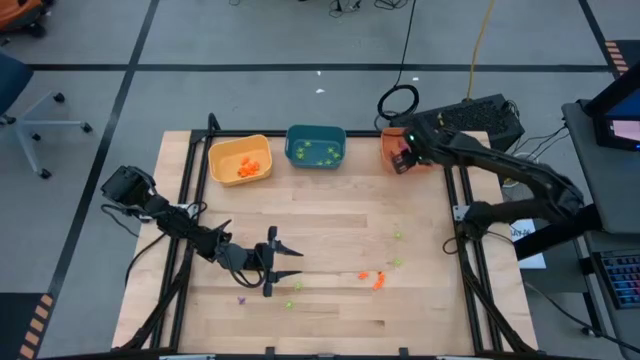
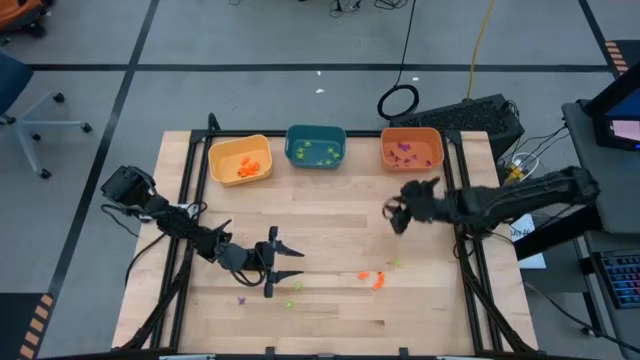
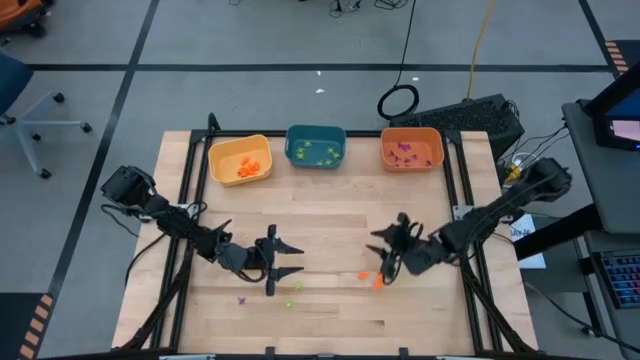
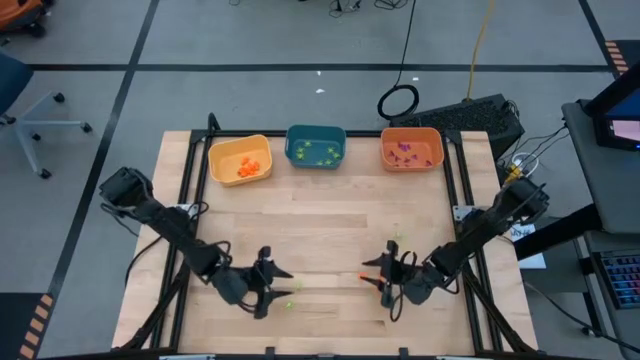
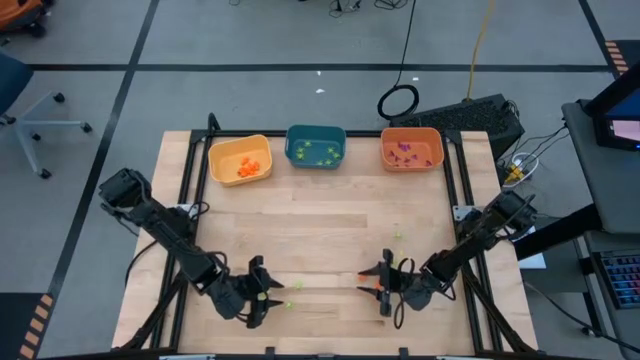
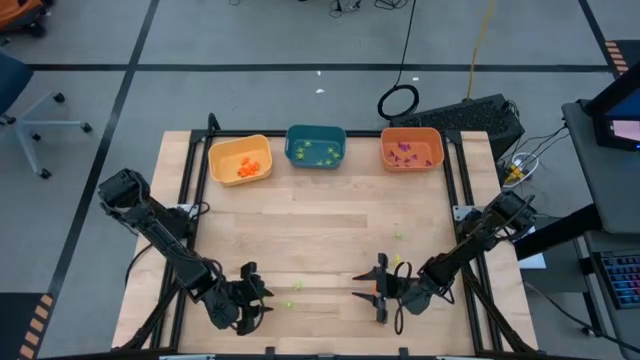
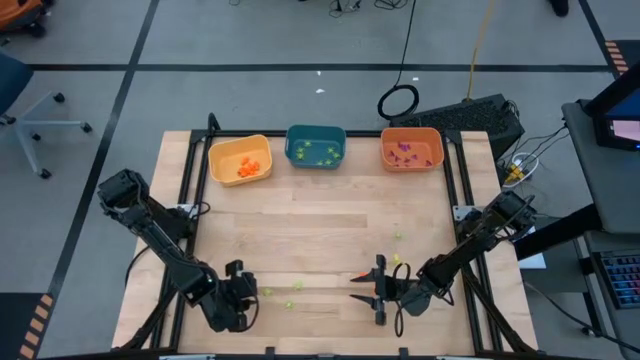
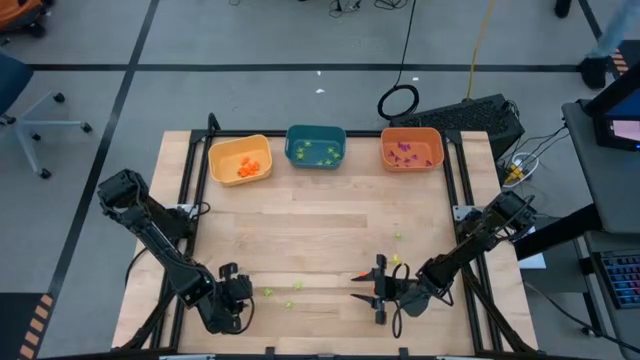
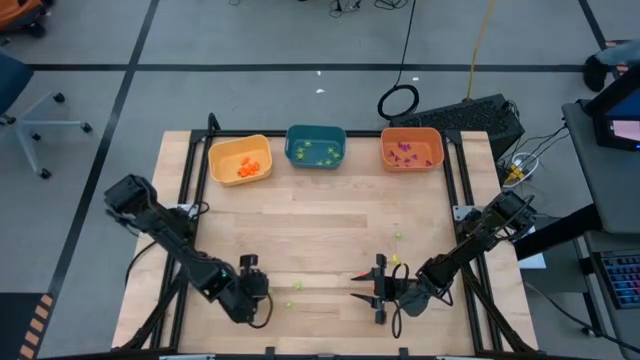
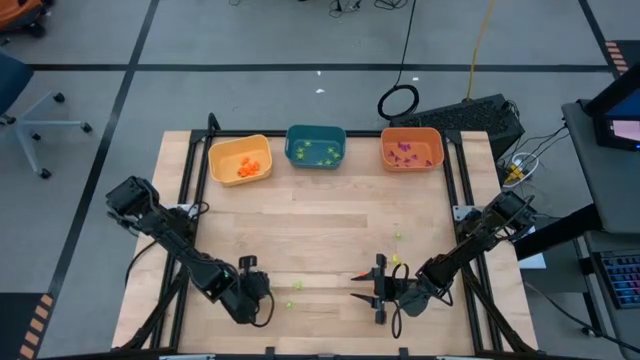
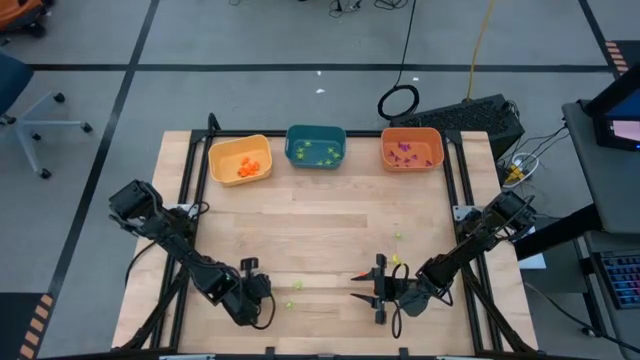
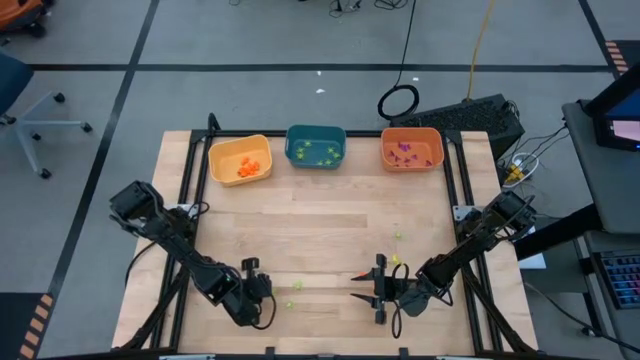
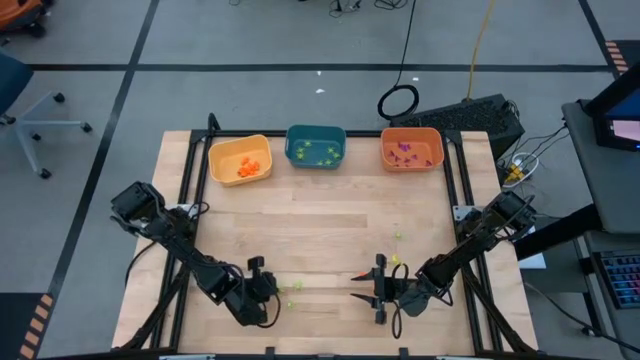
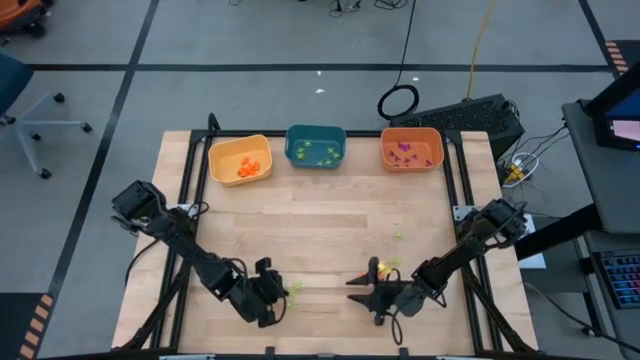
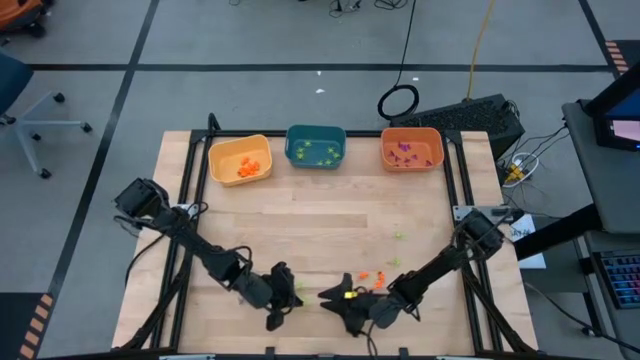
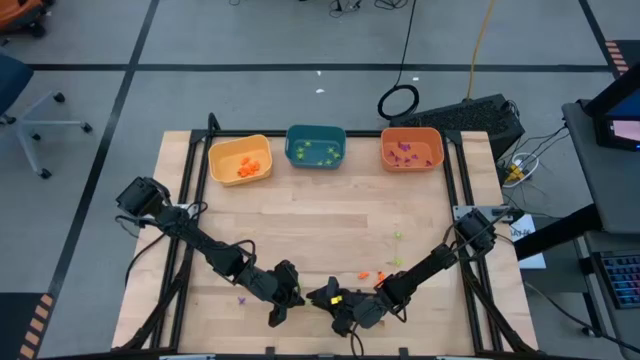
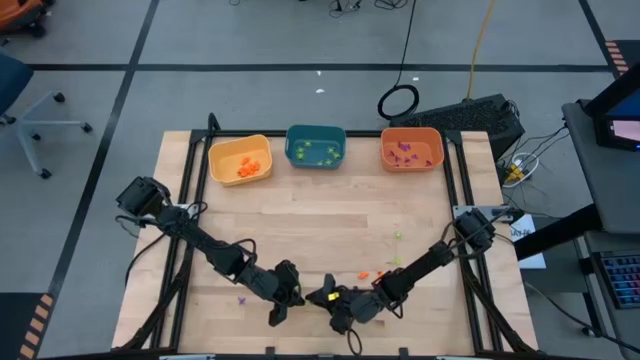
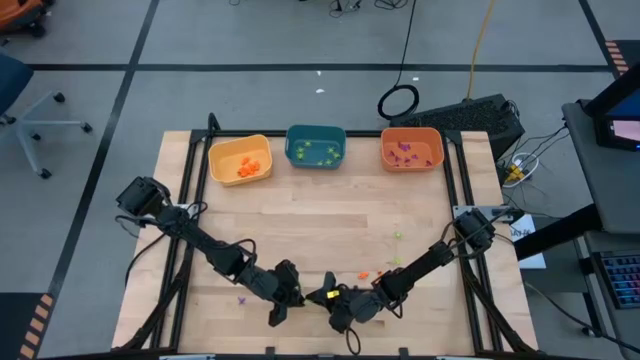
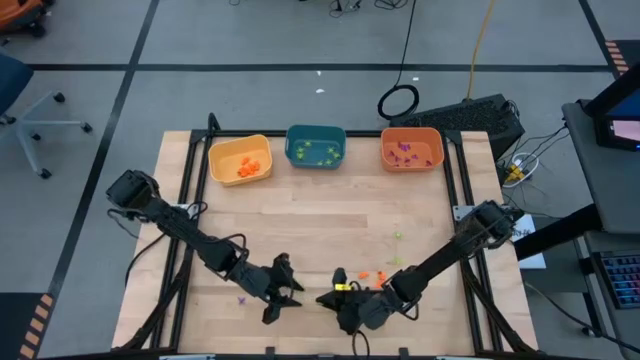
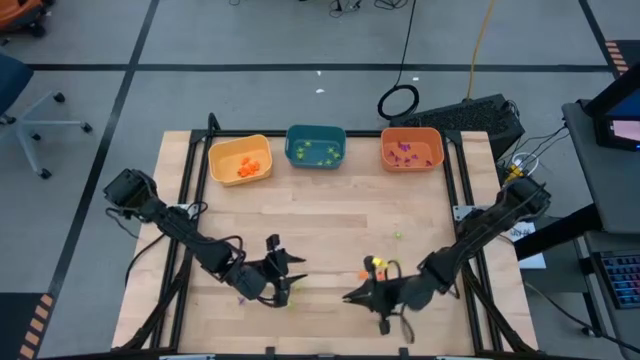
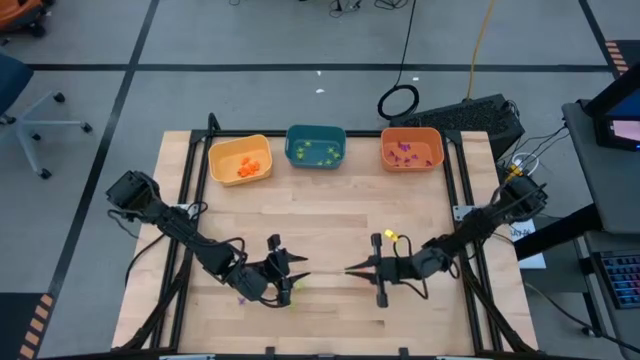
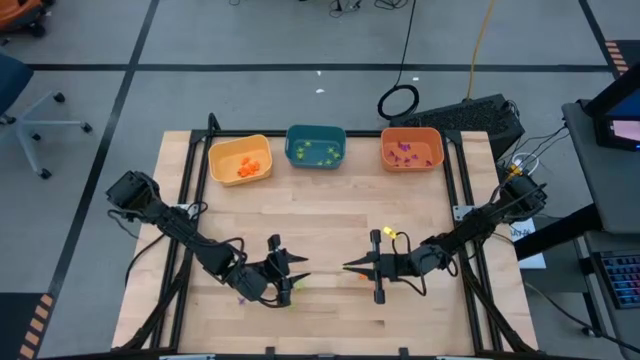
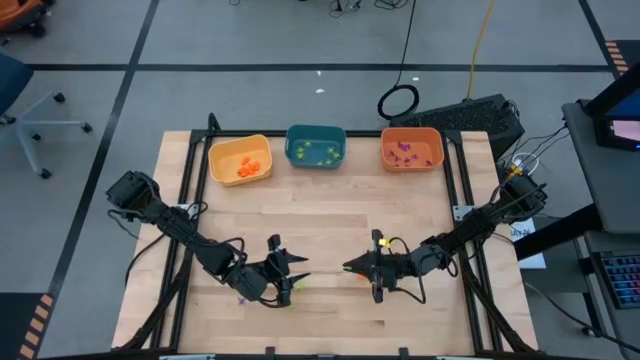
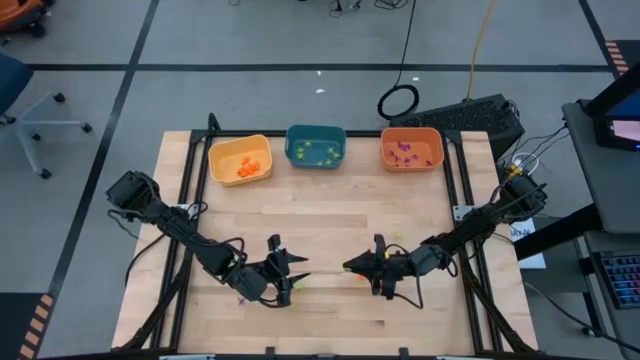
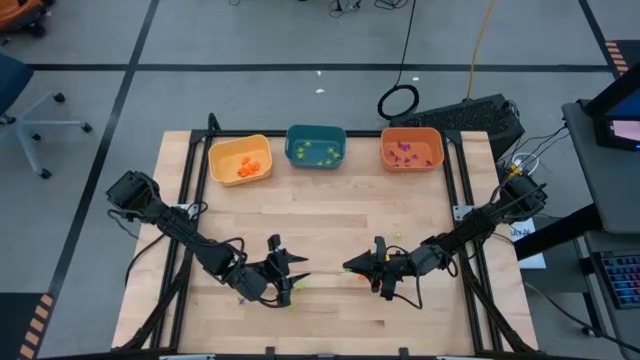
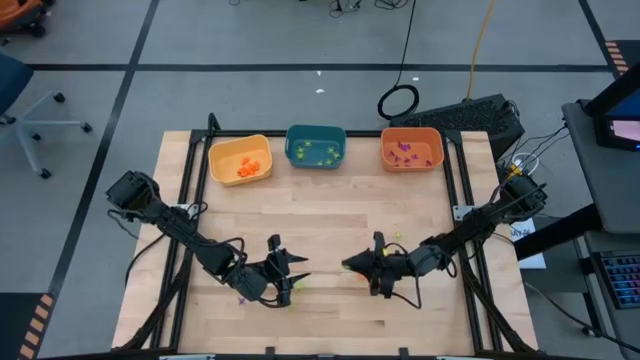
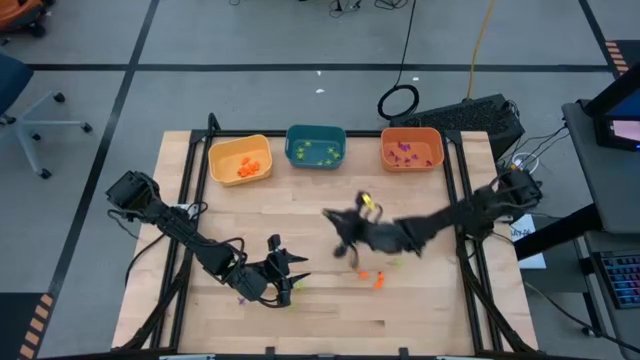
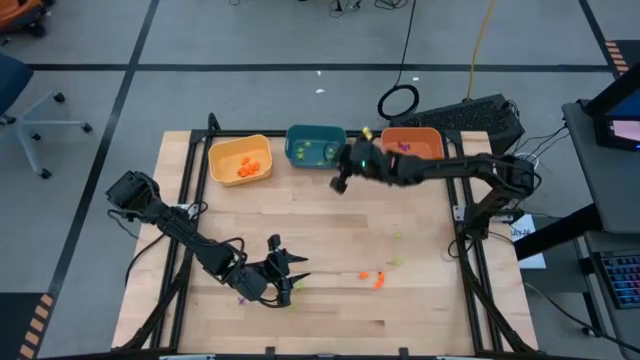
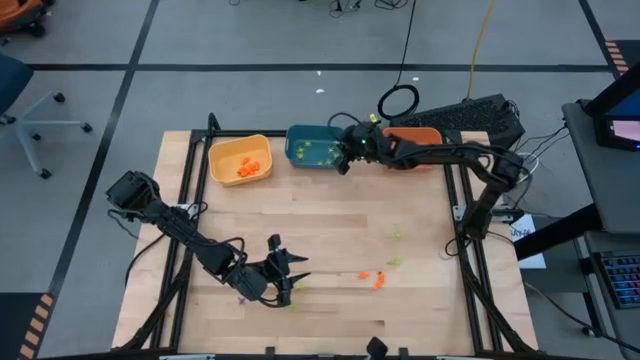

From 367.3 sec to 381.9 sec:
Task: Sort Halloween decoration
Put the green spider toy into the blue bin

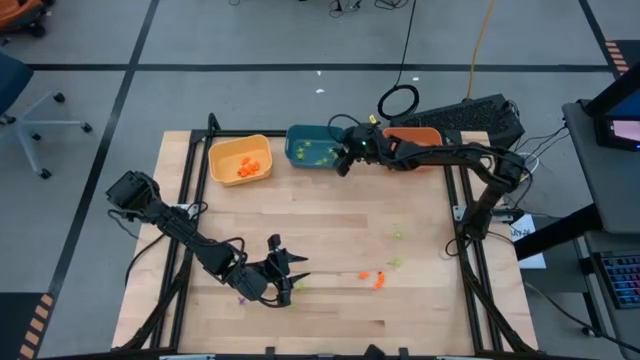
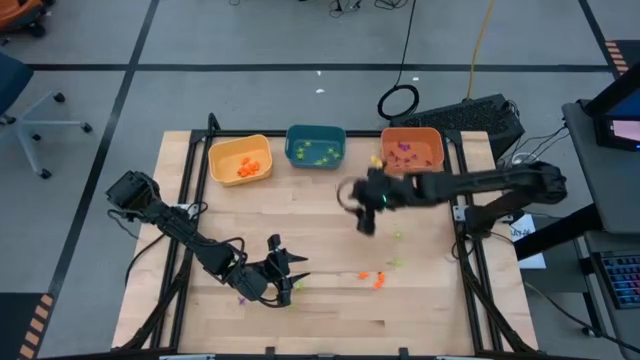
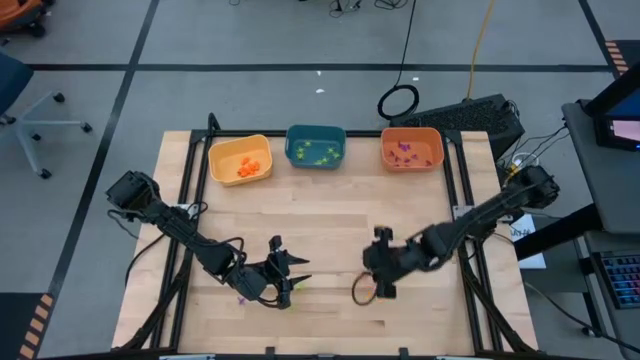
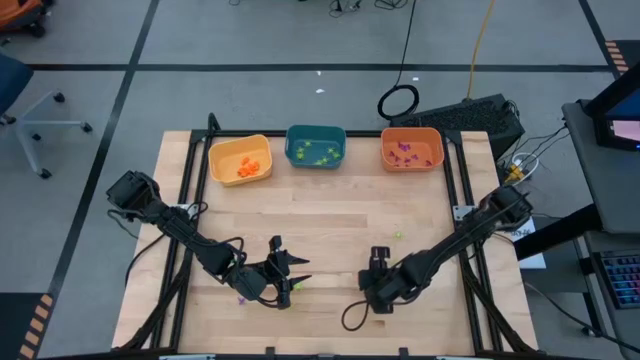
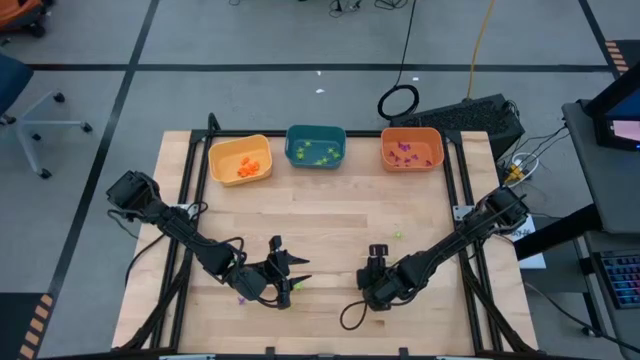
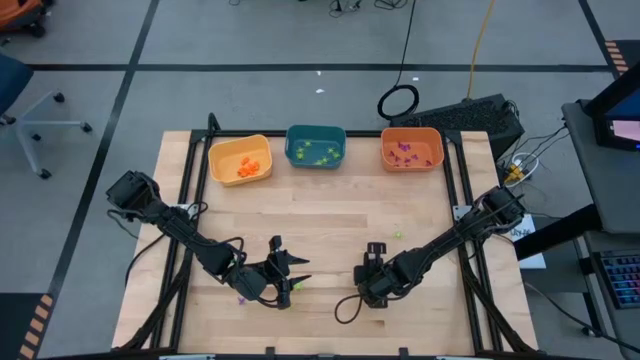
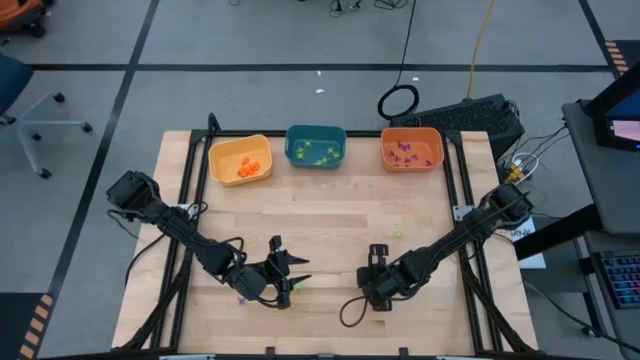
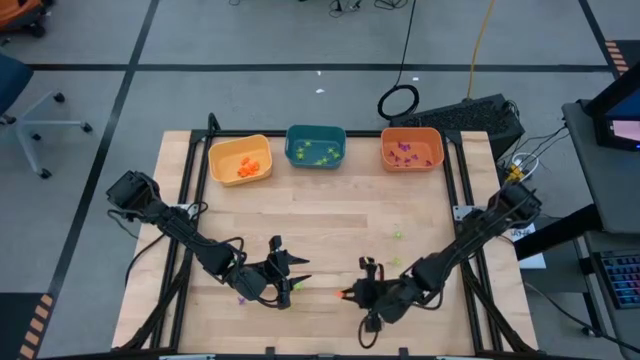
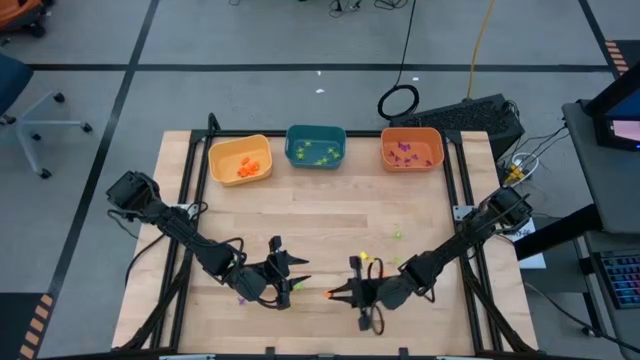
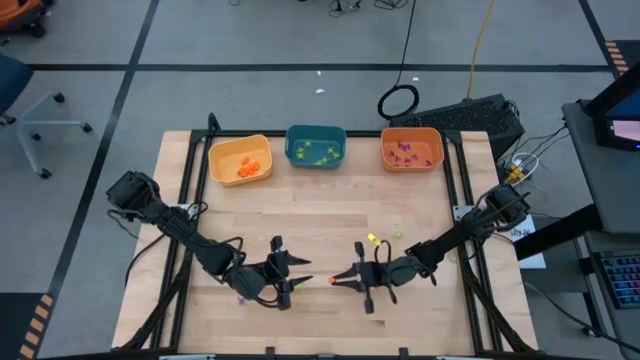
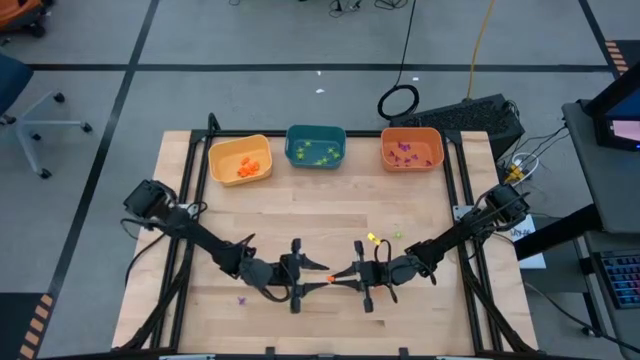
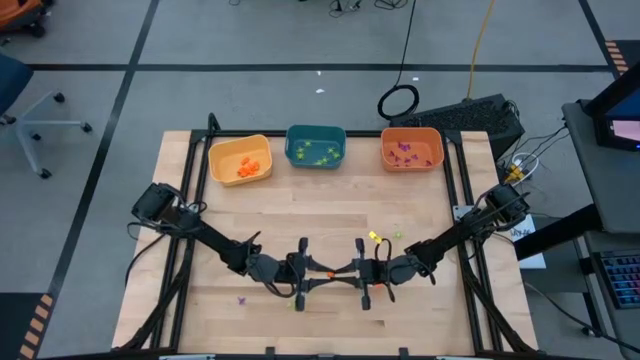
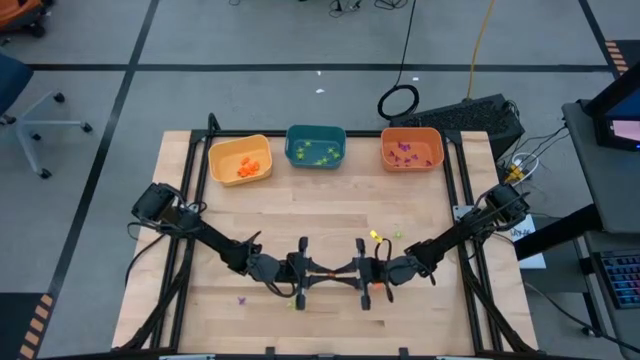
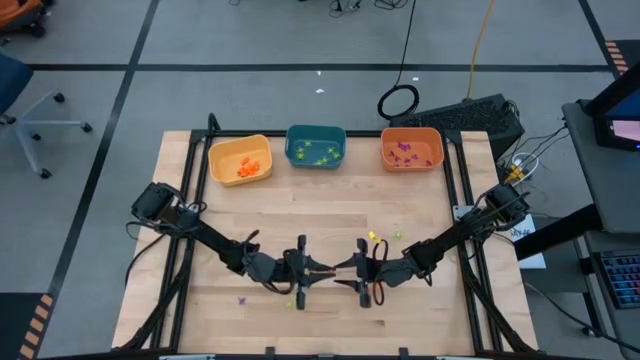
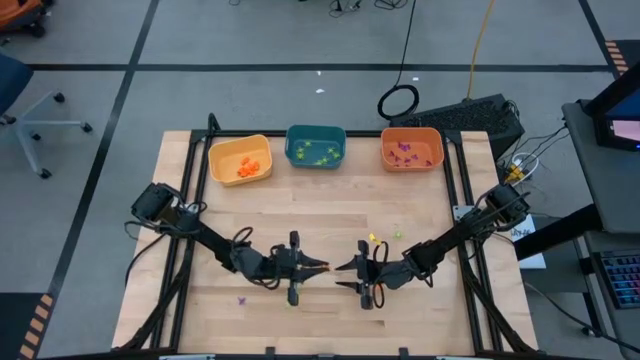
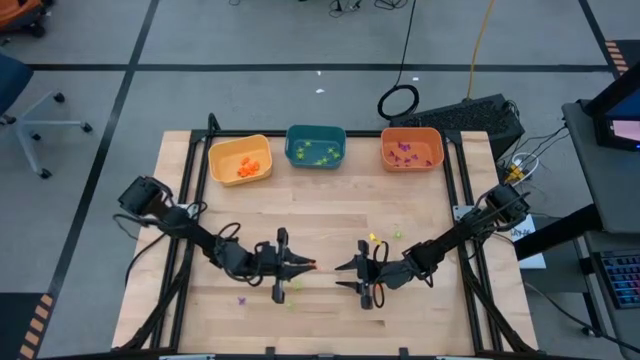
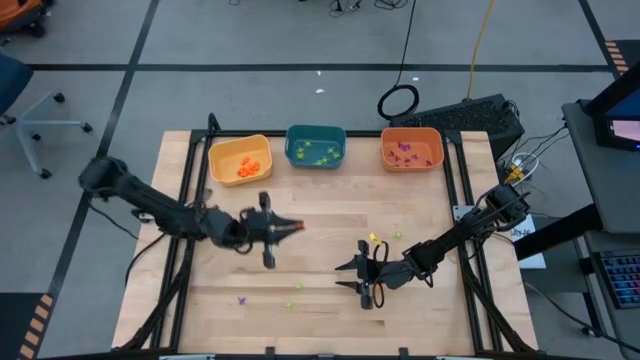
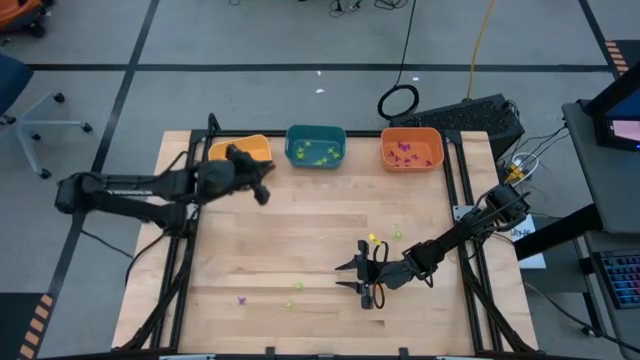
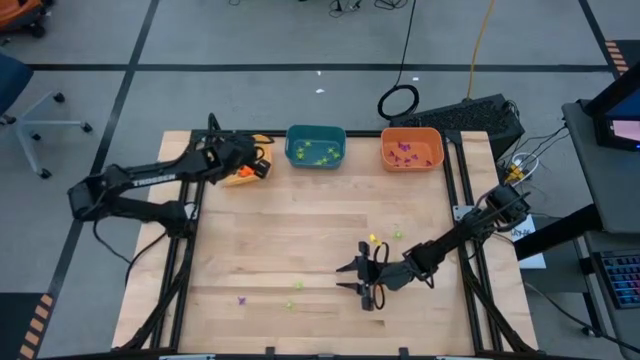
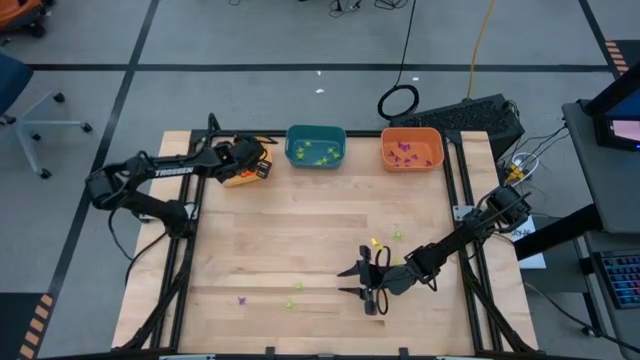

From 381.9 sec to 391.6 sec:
Put the orange skeleton toy into the yellow bin
